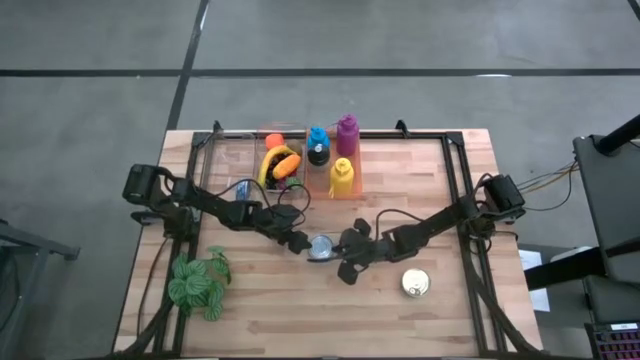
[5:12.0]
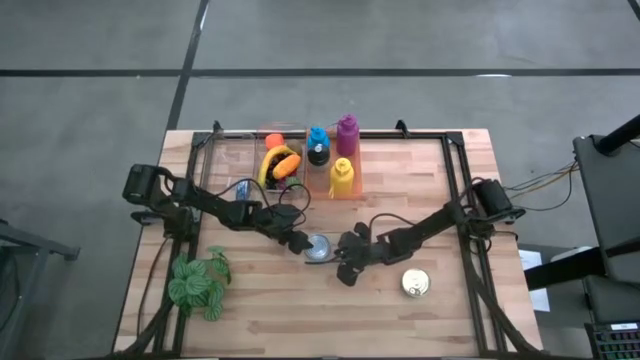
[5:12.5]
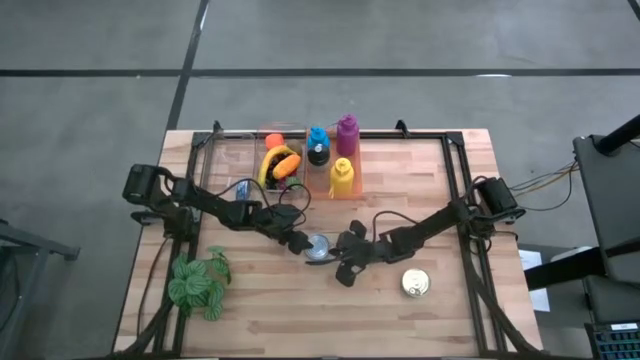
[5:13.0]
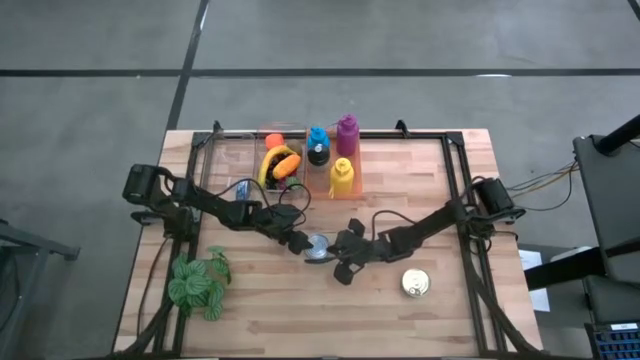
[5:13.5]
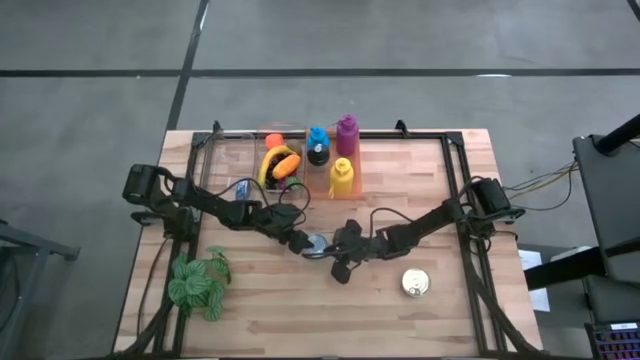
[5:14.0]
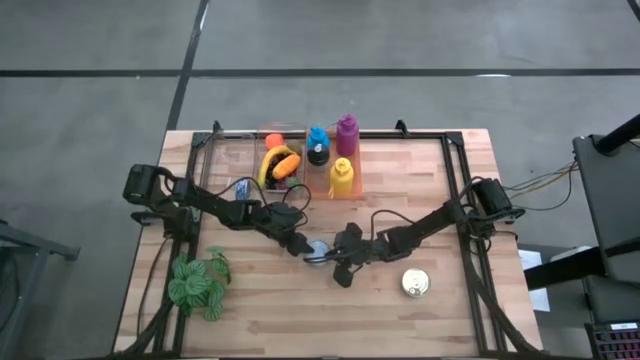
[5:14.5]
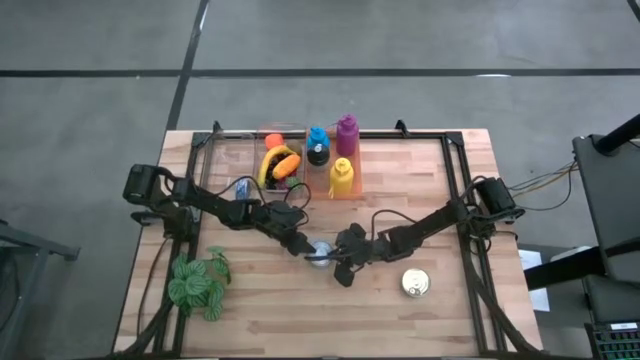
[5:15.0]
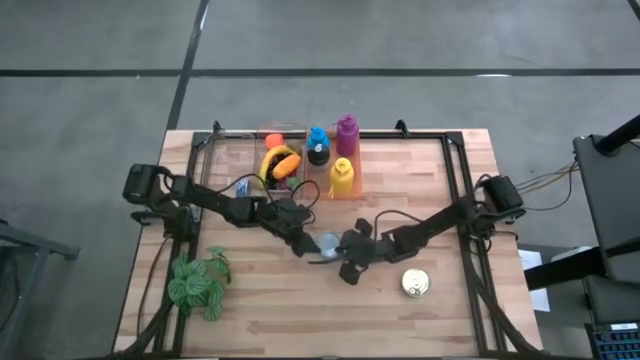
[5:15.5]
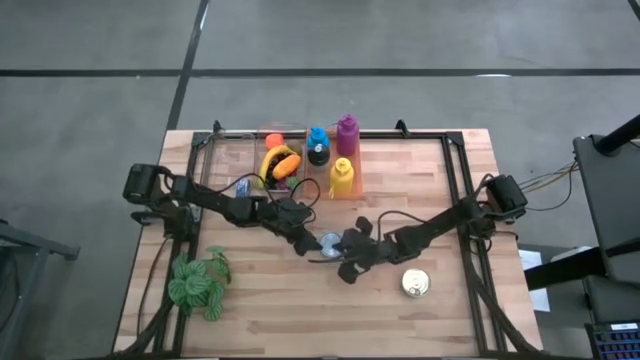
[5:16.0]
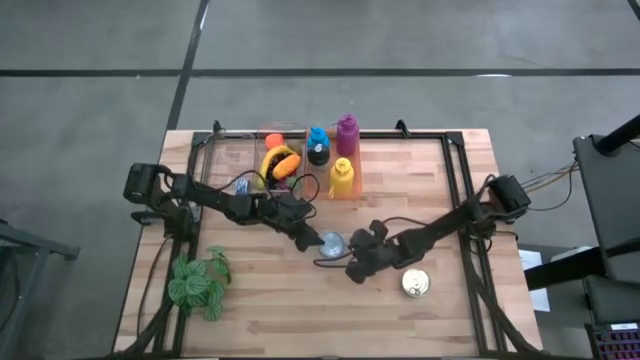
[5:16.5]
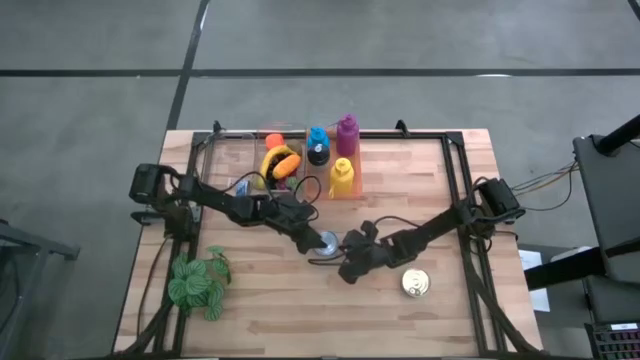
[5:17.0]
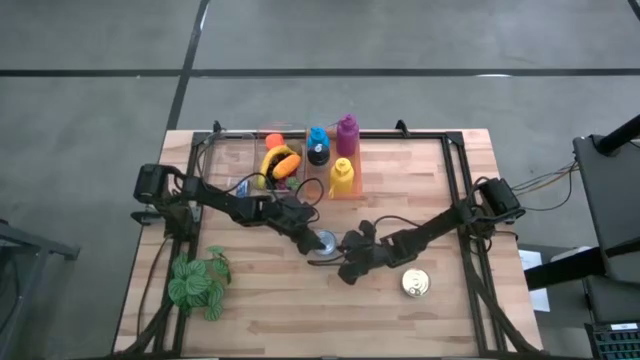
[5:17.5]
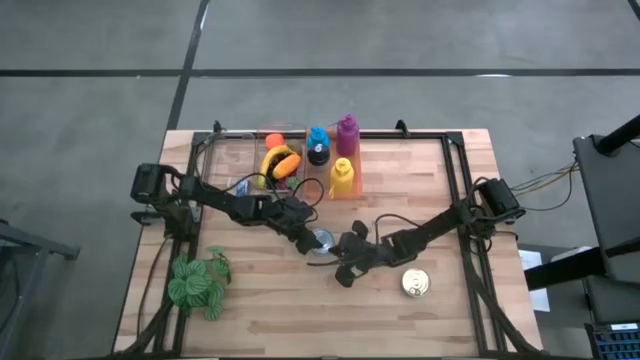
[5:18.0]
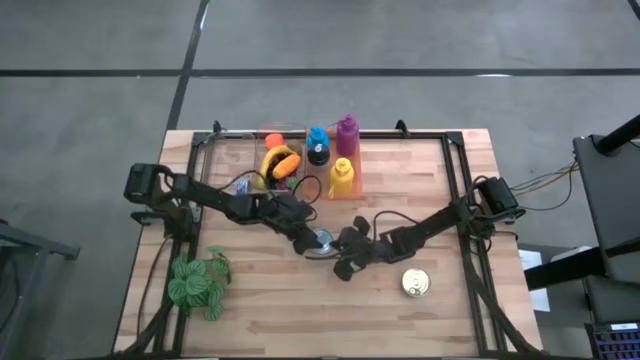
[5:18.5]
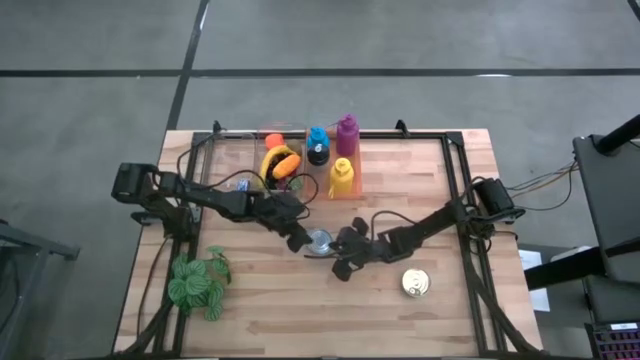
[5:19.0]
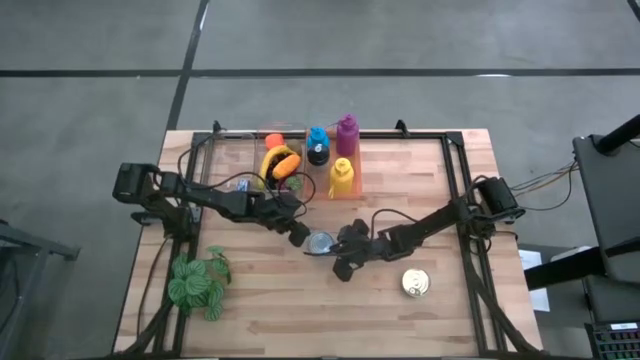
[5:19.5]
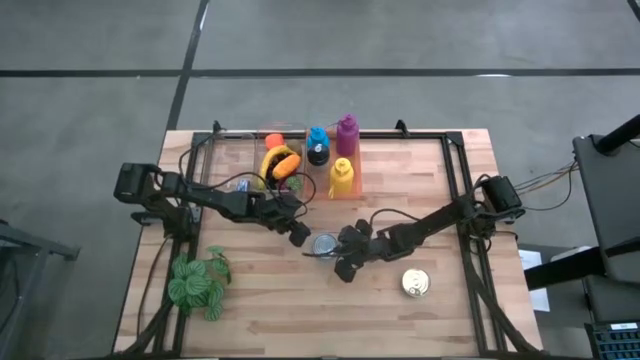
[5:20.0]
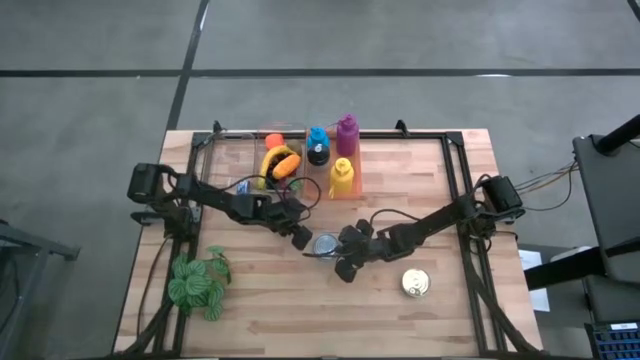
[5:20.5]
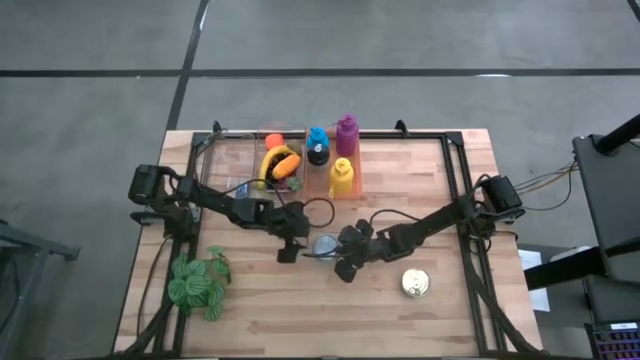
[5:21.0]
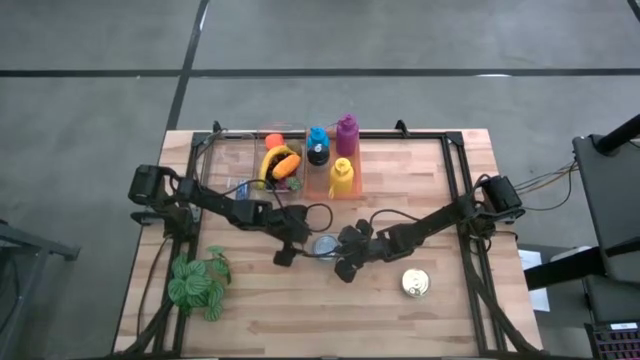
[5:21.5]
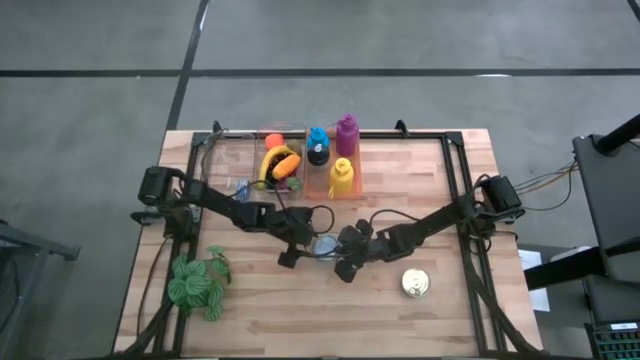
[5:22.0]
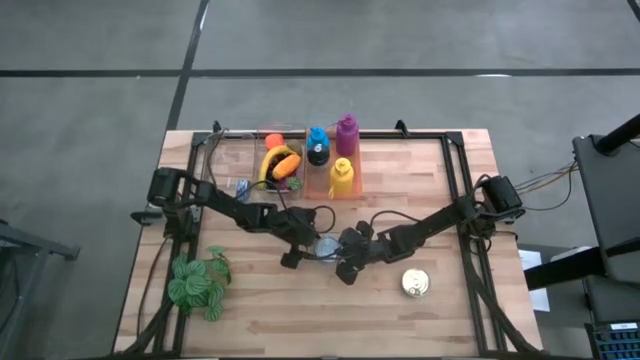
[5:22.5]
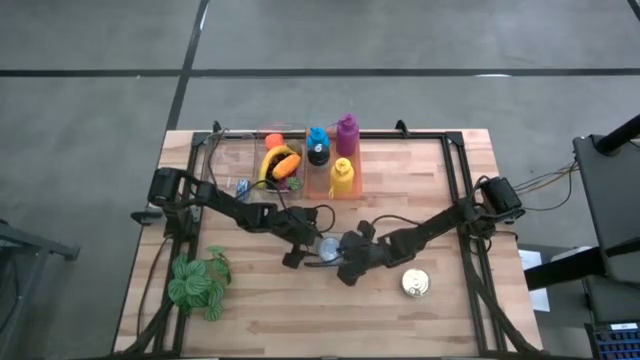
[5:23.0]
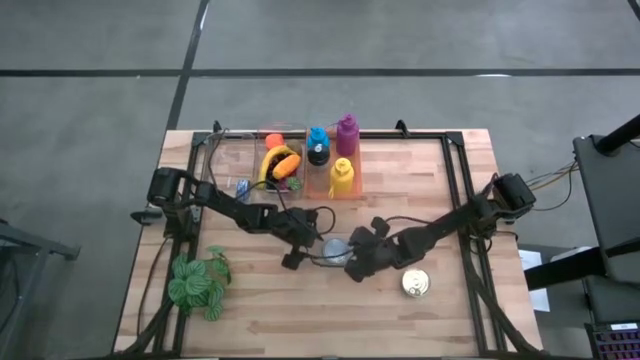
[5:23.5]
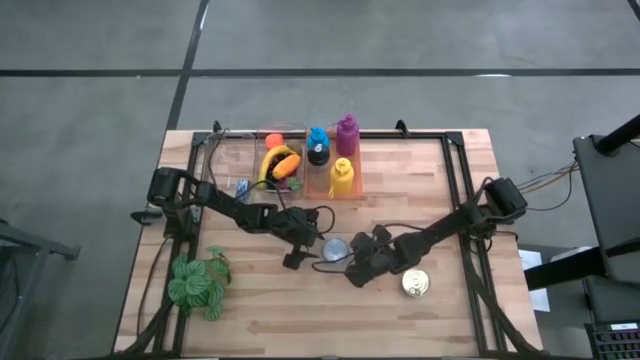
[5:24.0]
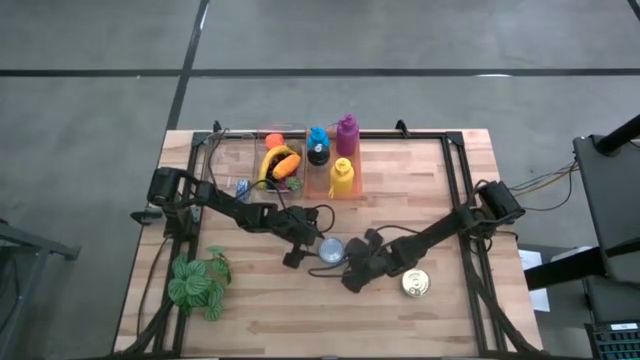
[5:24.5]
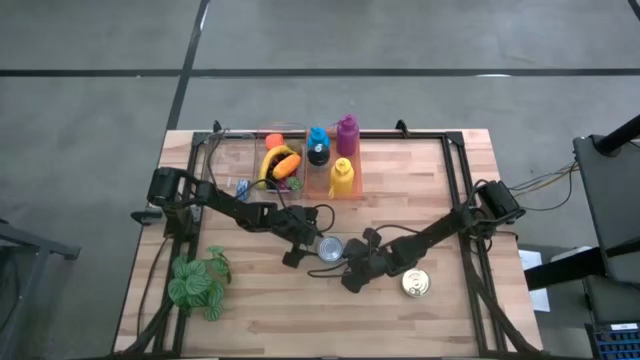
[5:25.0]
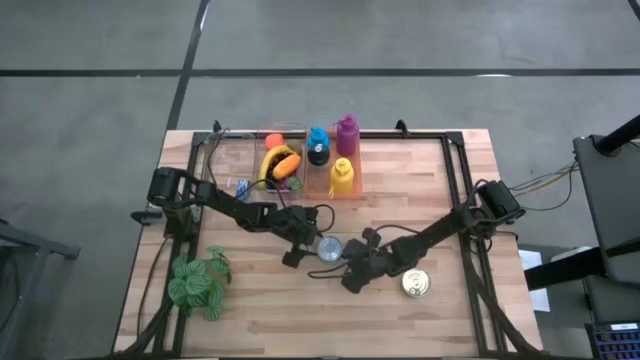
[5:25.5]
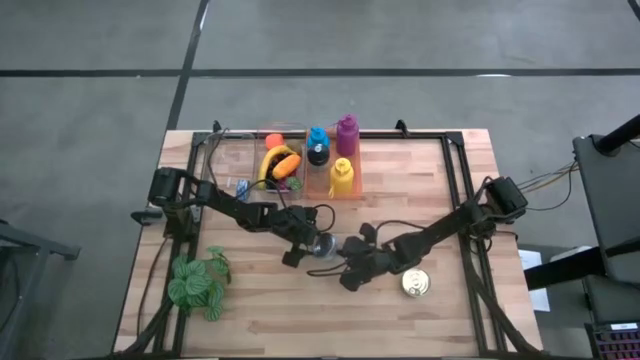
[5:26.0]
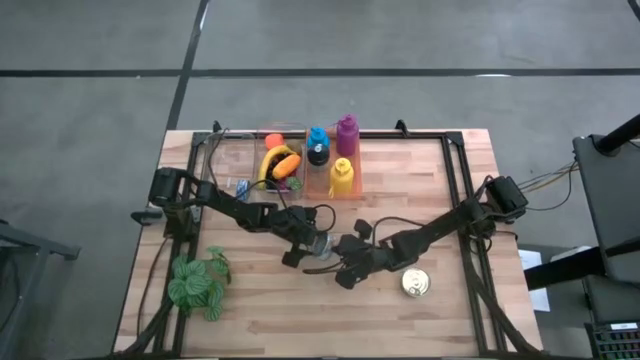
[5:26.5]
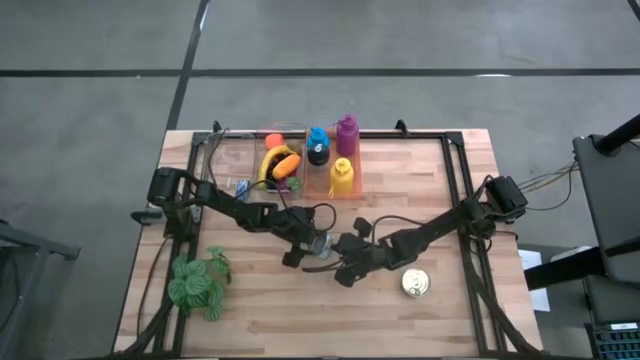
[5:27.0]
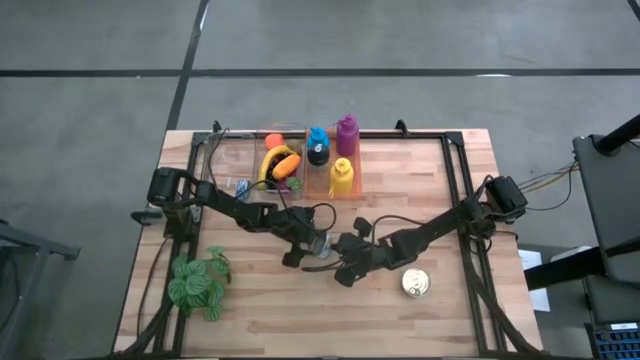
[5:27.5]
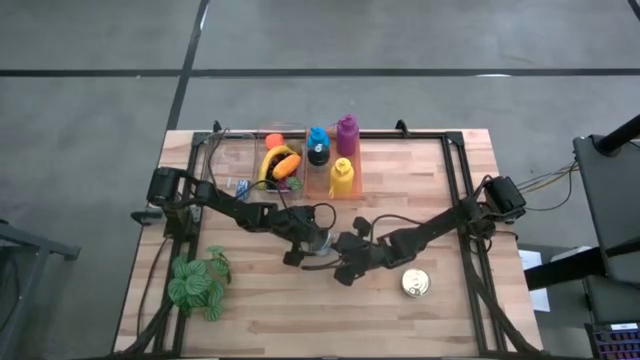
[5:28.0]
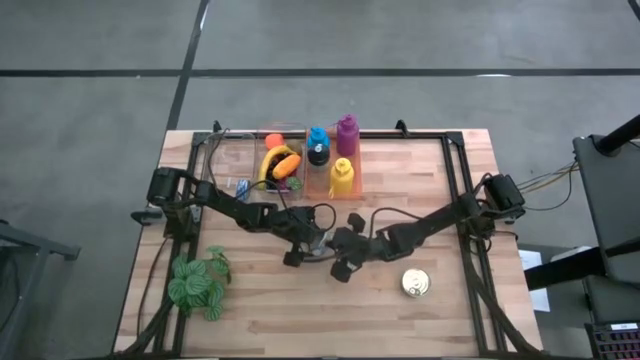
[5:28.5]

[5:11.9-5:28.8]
Task: Pick & Place Food Item
Put the light blue tuna can into the left transparent bin
